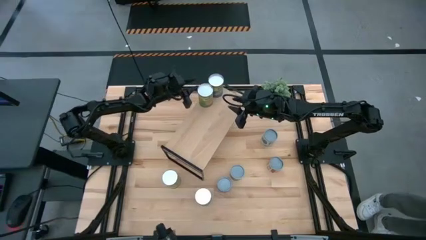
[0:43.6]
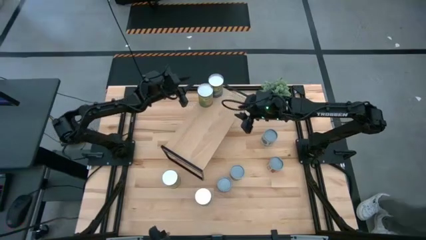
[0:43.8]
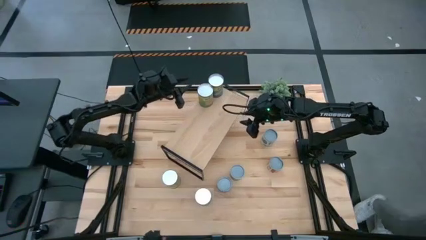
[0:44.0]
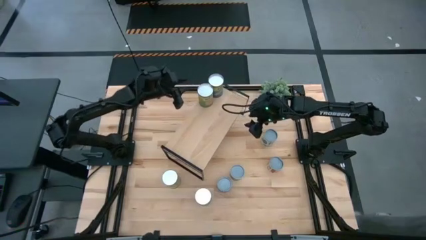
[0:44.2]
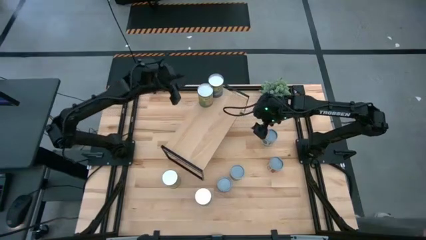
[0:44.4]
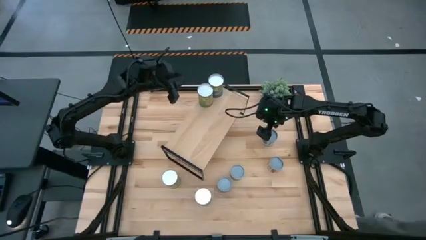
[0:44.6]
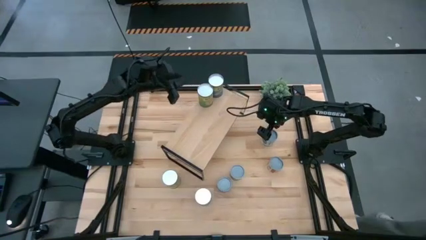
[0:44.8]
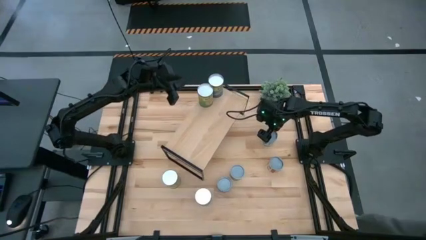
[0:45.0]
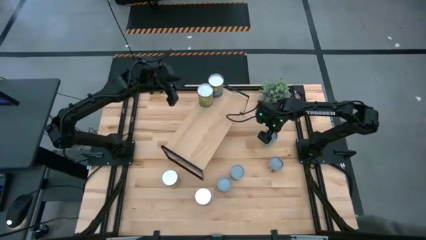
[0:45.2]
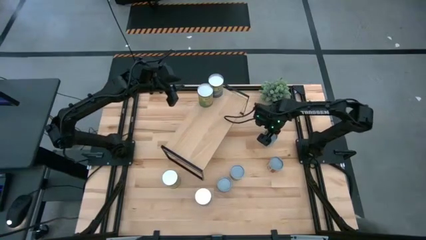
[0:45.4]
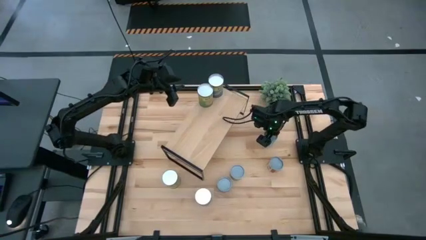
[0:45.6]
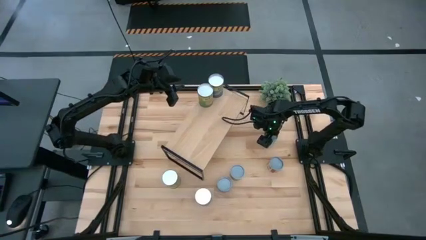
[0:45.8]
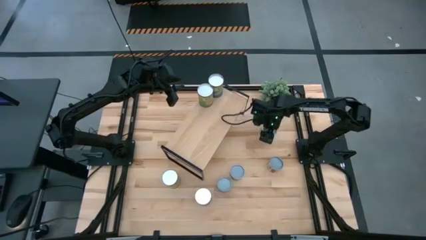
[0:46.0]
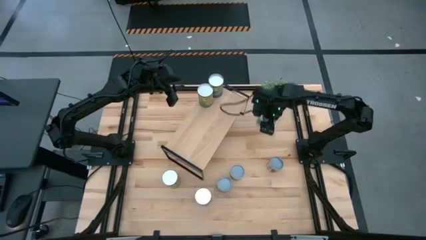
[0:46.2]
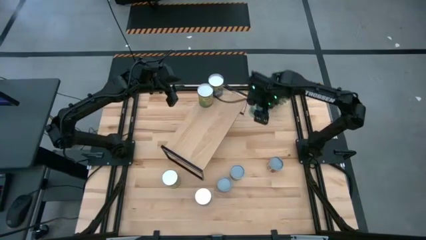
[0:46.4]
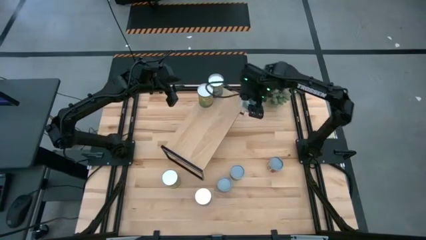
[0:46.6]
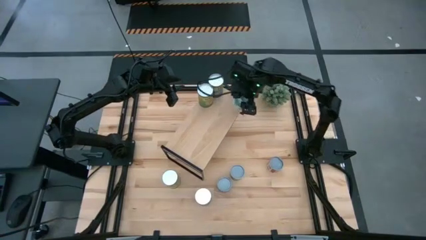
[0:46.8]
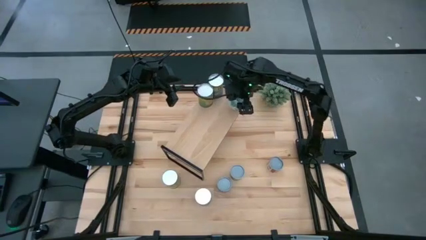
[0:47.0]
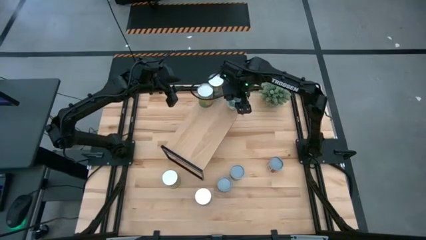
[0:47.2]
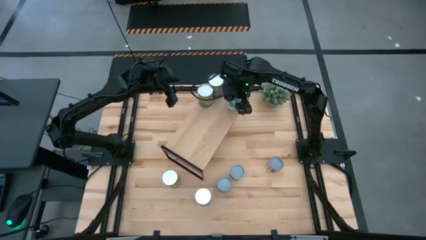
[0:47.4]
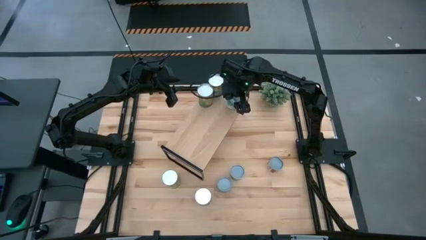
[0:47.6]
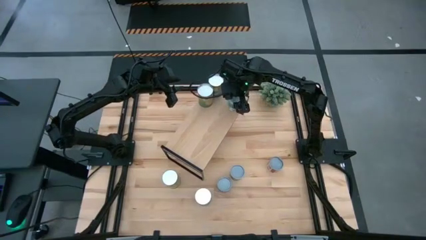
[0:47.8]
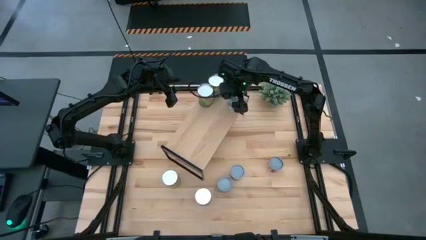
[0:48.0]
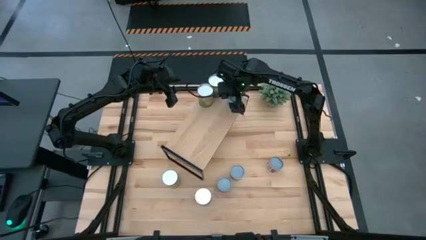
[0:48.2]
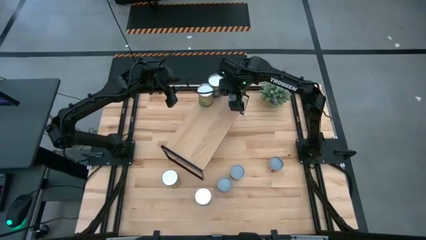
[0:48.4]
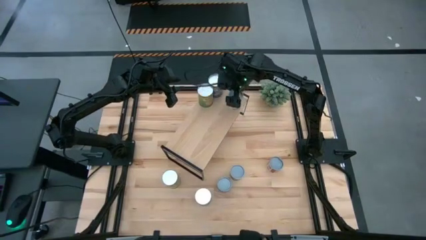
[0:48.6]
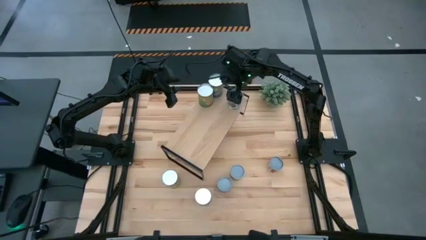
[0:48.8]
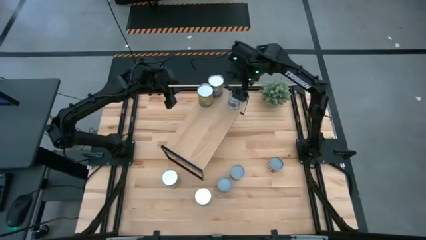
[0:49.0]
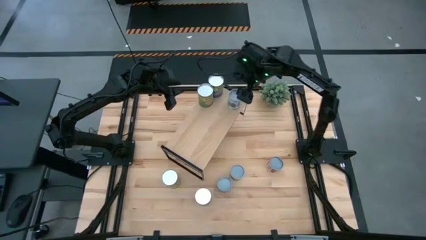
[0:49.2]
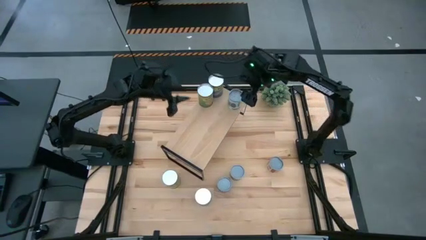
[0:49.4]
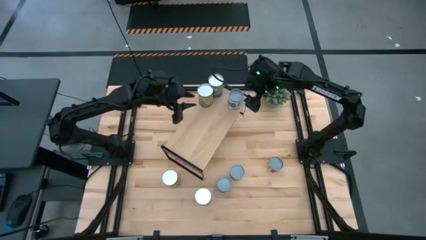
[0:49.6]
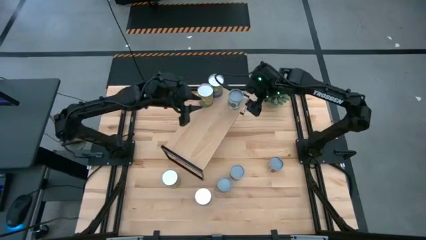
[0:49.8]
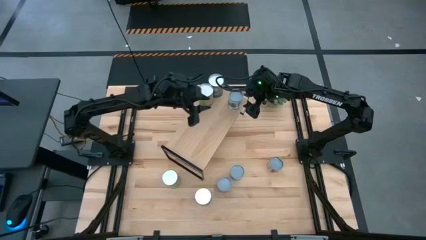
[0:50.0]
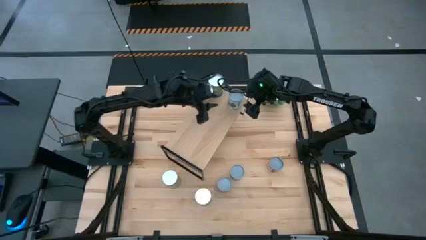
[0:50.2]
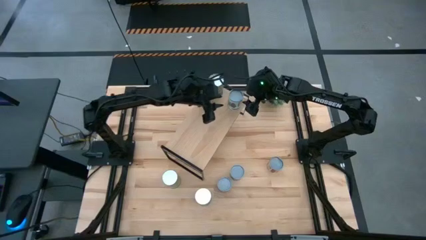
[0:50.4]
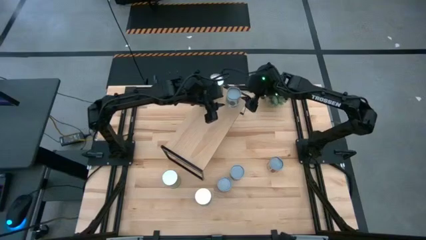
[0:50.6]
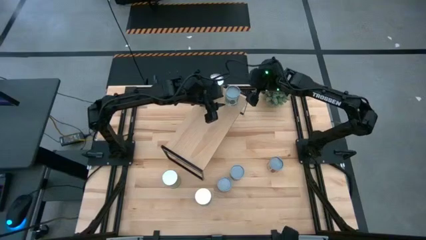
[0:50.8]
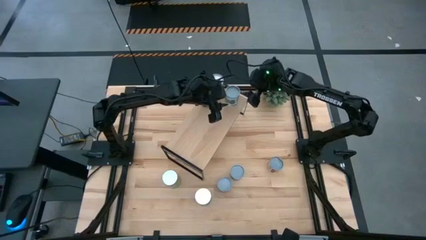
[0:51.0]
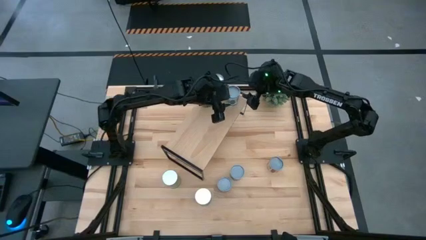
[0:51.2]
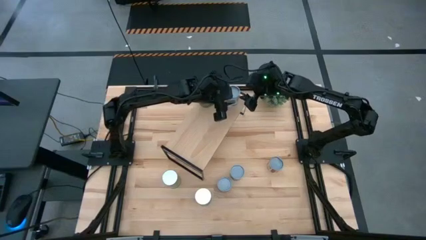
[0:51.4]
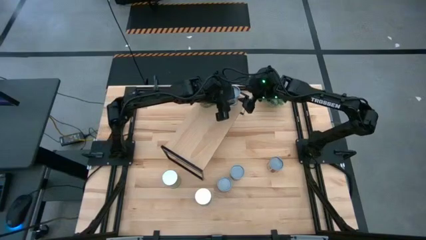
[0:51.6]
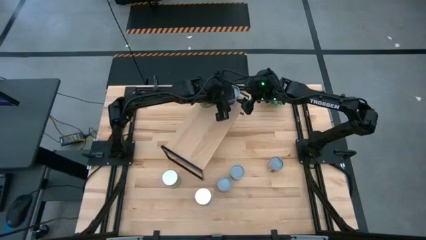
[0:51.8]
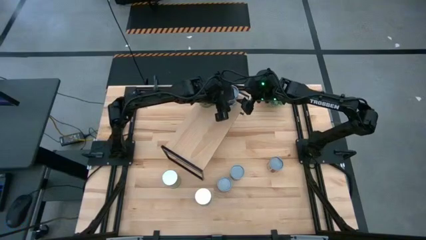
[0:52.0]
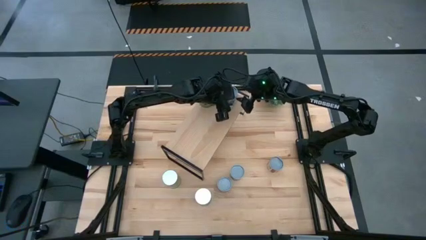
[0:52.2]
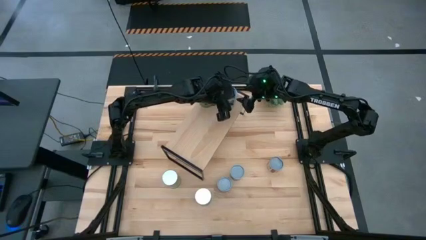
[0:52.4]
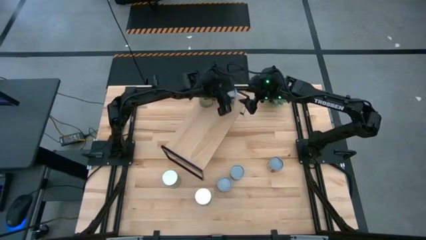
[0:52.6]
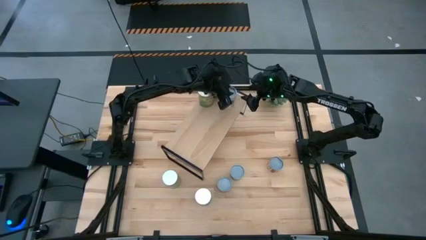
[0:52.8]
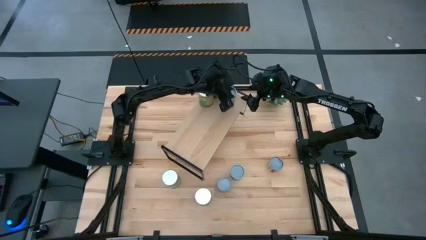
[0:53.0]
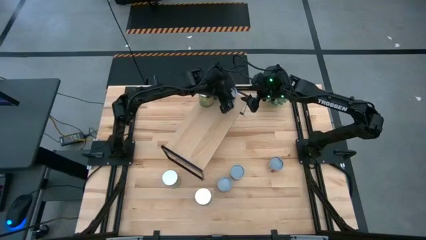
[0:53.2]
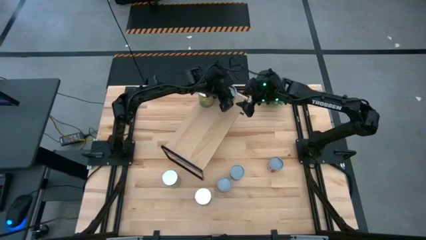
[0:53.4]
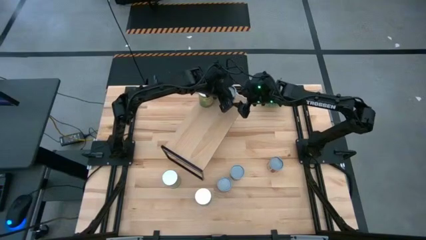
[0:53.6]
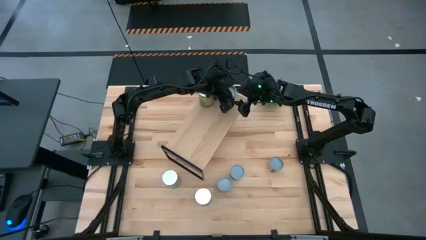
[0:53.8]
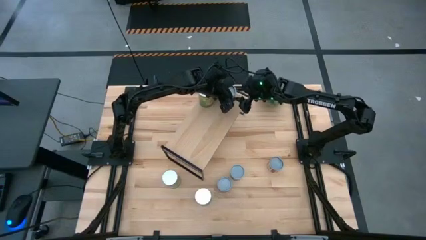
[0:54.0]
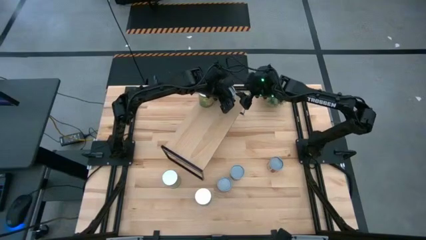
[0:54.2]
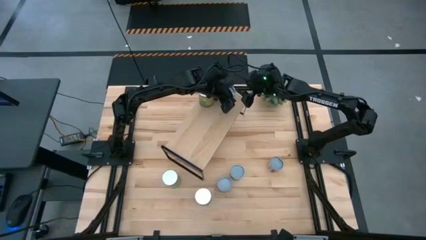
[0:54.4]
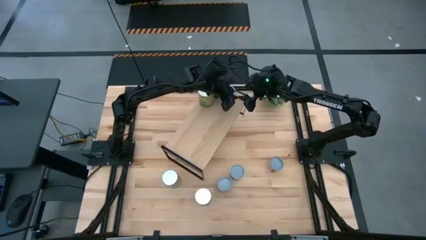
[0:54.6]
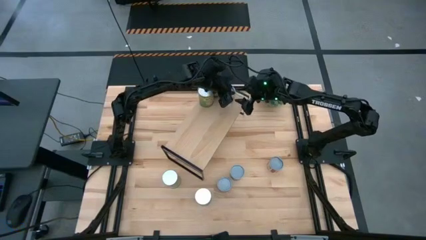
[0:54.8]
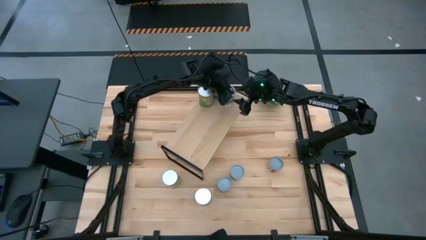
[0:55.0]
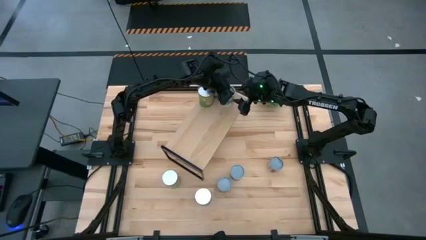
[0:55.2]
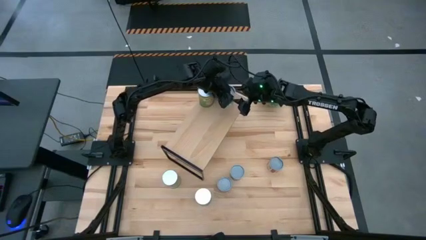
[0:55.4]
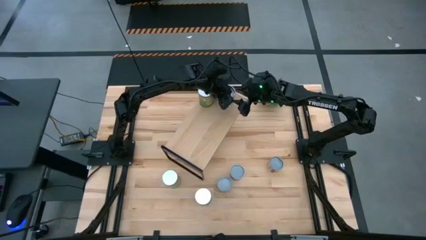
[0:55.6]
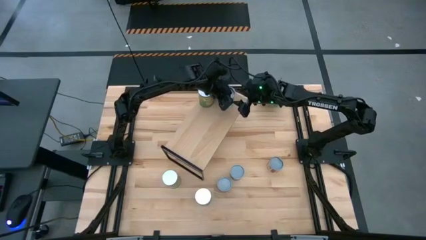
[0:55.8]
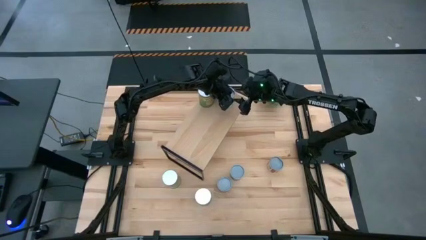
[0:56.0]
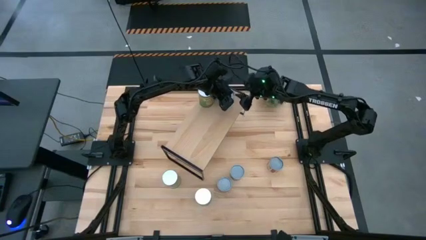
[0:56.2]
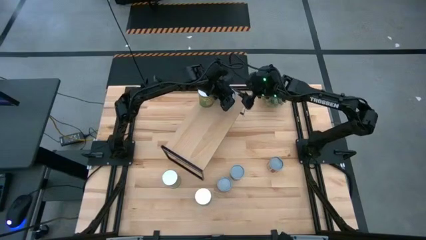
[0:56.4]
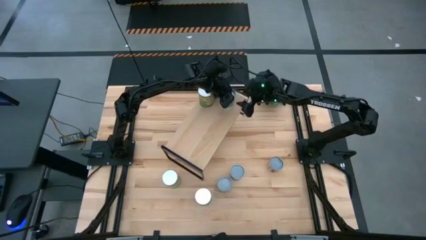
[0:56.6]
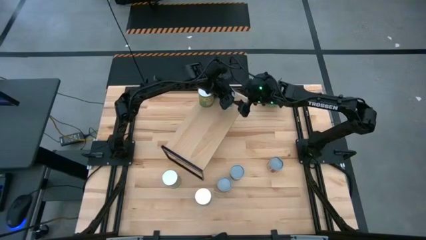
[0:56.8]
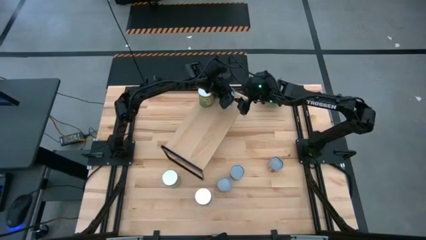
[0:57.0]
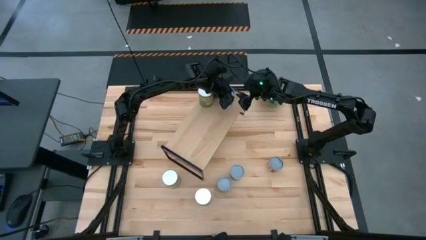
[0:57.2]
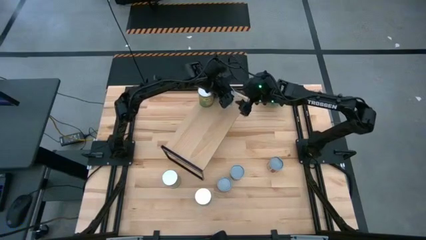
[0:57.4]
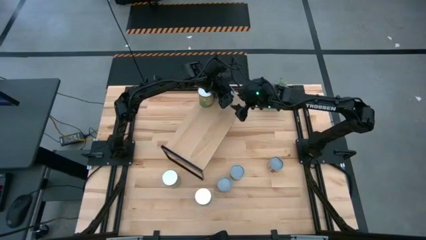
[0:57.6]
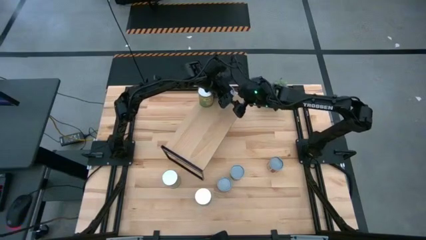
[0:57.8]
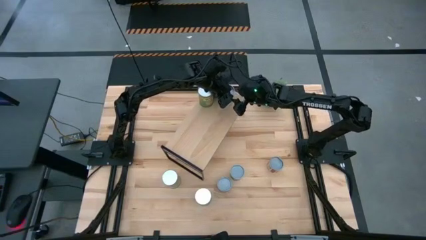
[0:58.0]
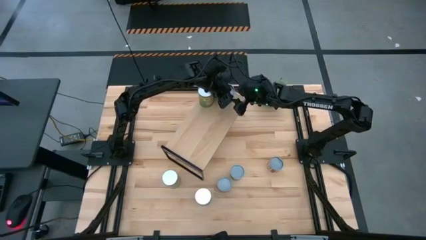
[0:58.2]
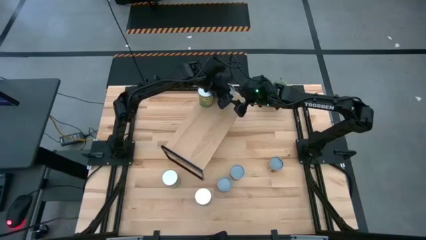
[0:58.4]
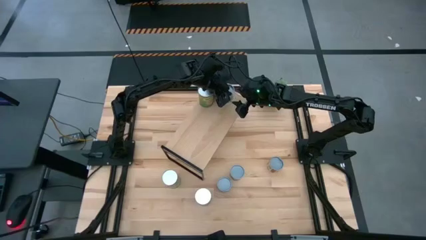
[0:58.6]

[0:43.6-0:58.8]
Task: Pick and place cans onto a shelf
Put the canned mixed vegetable on the shelf
